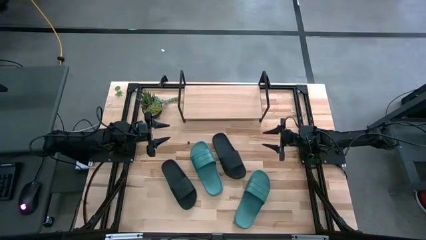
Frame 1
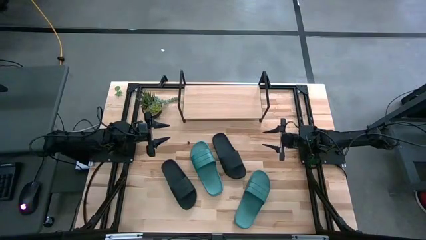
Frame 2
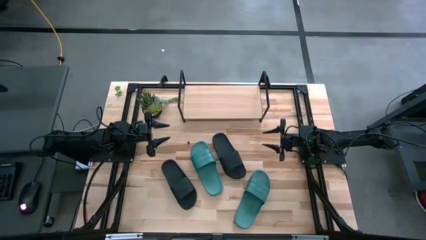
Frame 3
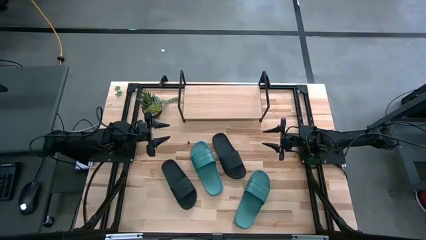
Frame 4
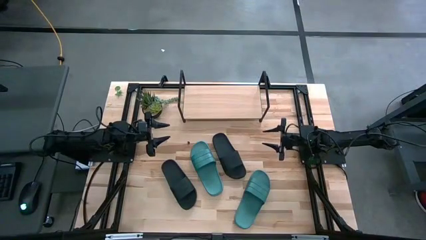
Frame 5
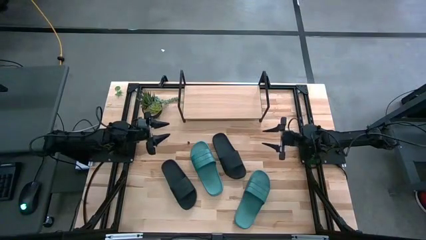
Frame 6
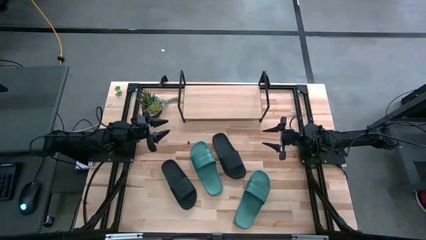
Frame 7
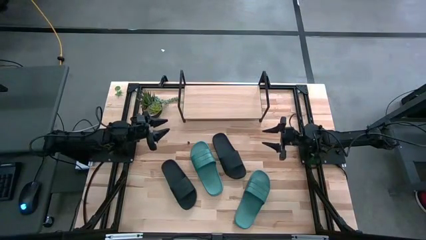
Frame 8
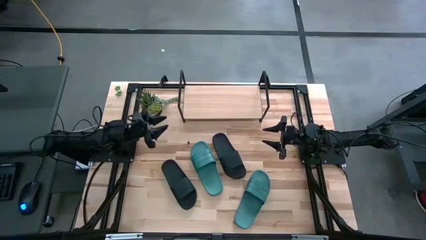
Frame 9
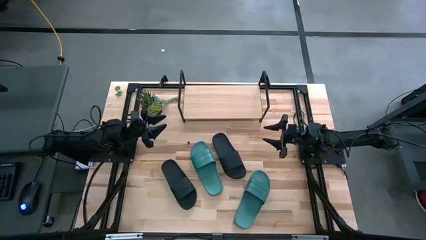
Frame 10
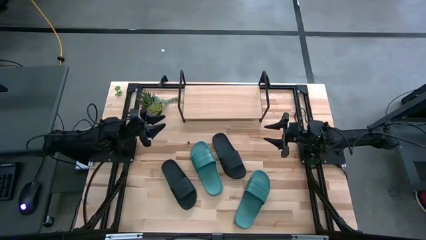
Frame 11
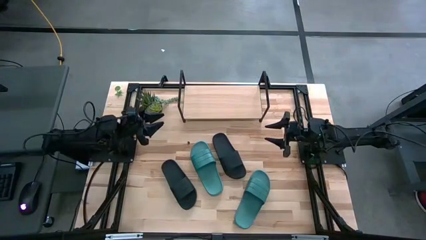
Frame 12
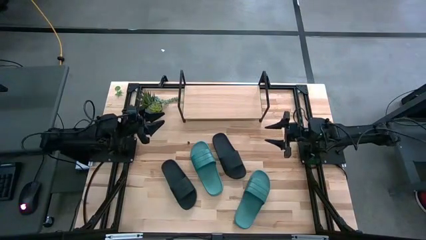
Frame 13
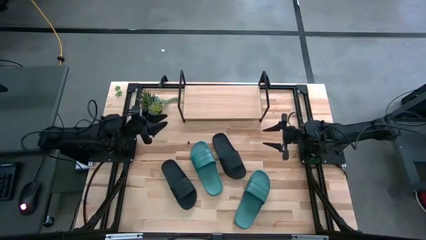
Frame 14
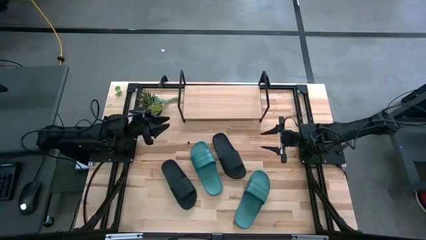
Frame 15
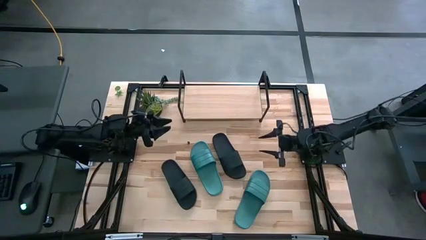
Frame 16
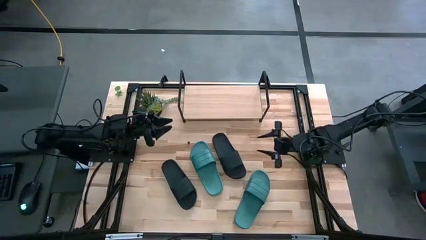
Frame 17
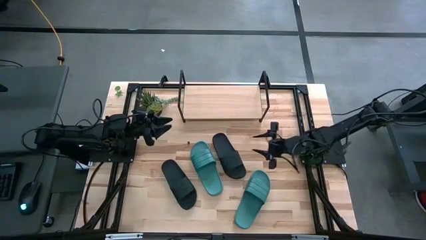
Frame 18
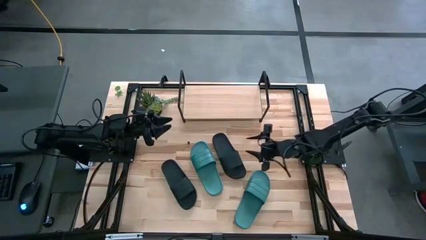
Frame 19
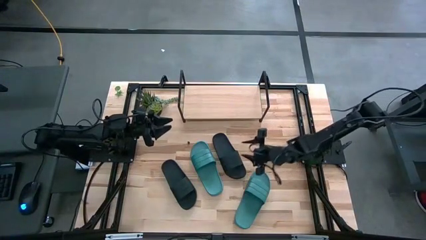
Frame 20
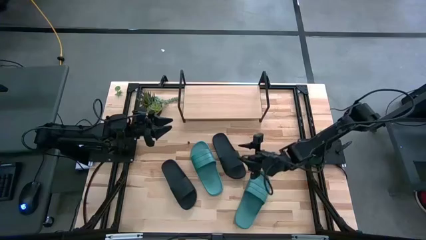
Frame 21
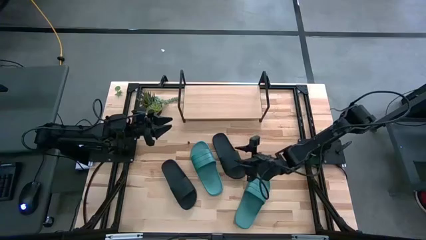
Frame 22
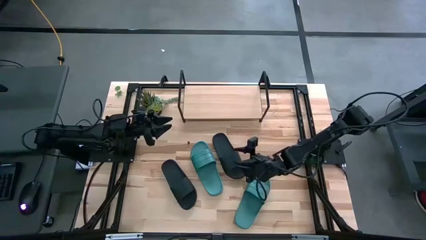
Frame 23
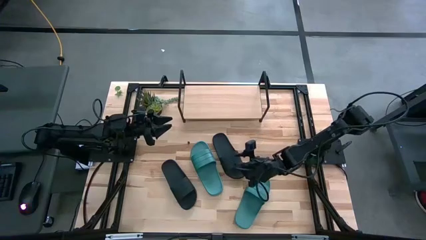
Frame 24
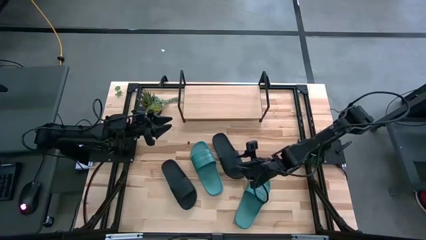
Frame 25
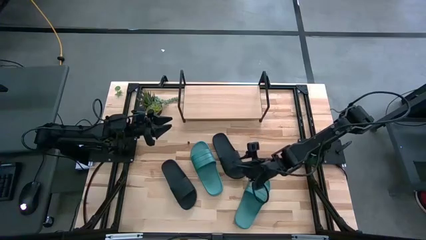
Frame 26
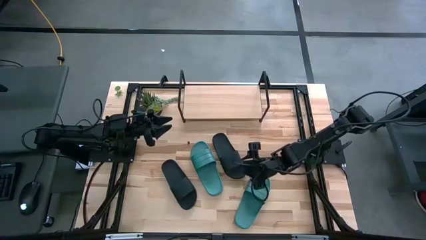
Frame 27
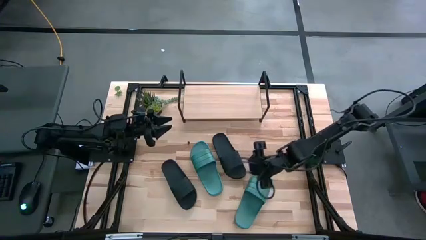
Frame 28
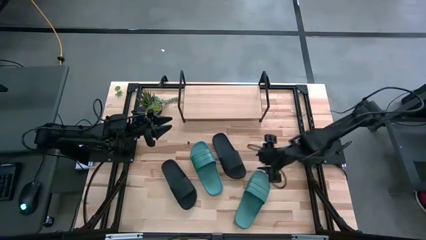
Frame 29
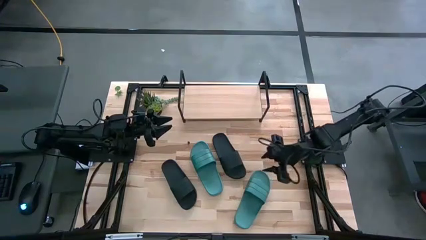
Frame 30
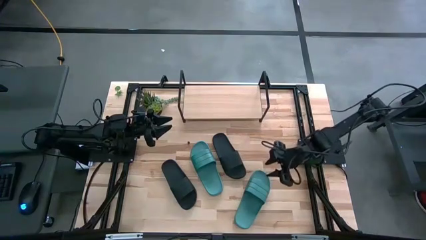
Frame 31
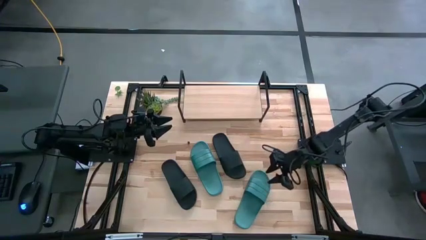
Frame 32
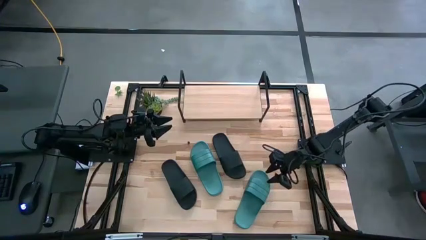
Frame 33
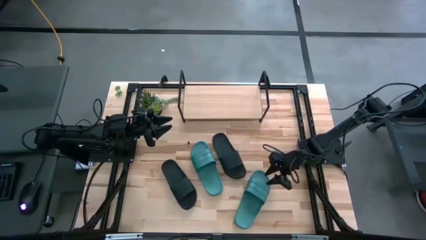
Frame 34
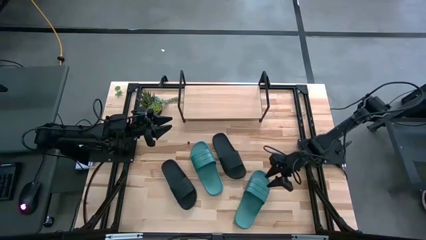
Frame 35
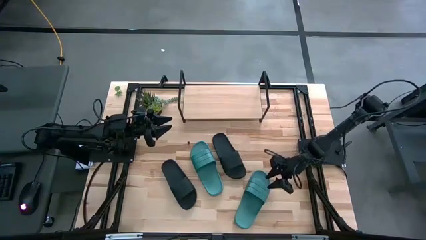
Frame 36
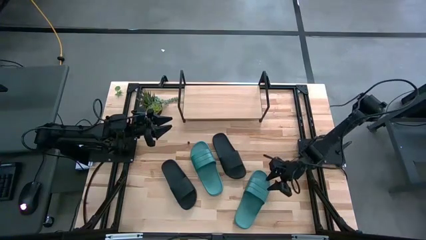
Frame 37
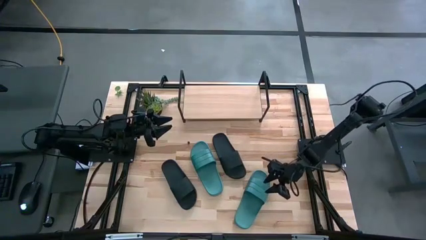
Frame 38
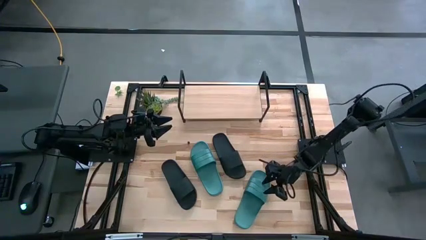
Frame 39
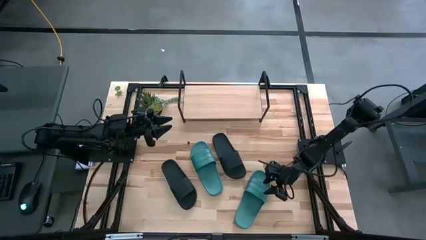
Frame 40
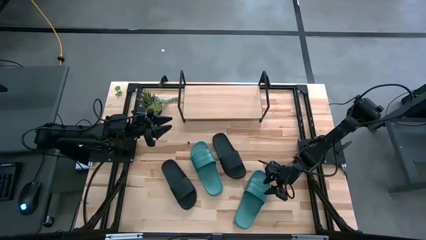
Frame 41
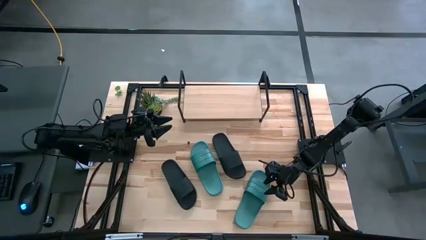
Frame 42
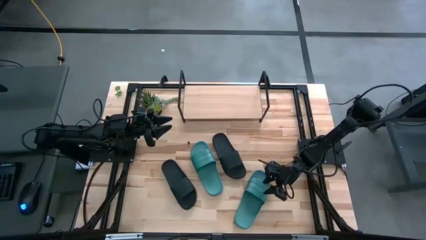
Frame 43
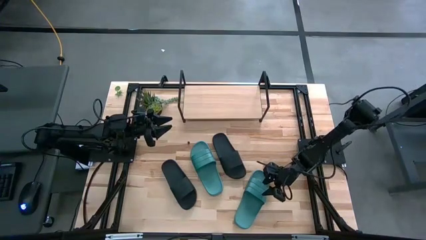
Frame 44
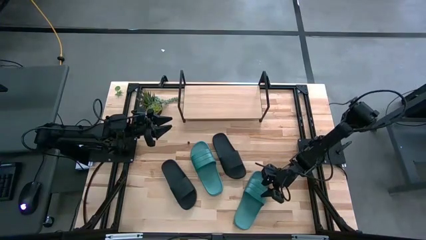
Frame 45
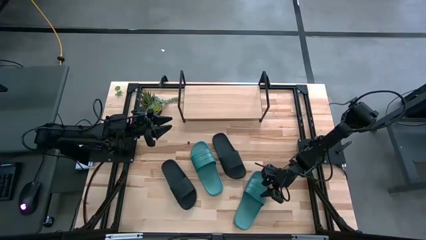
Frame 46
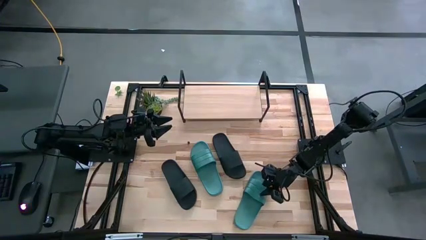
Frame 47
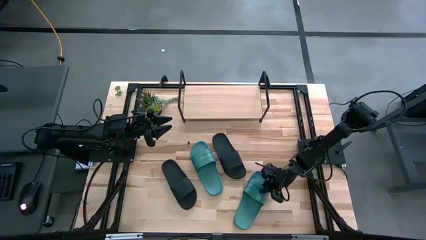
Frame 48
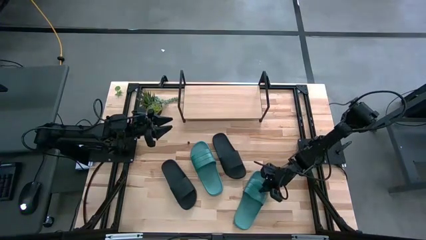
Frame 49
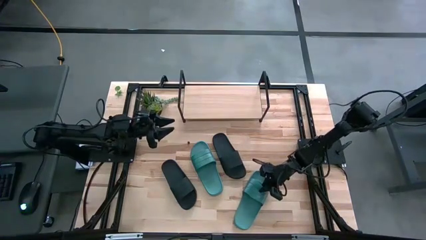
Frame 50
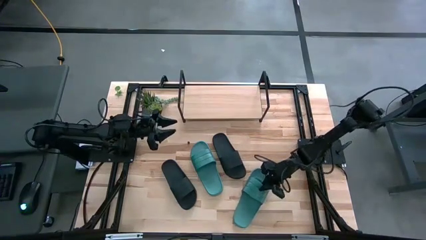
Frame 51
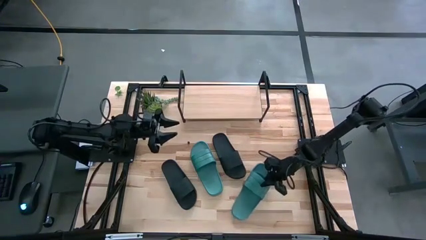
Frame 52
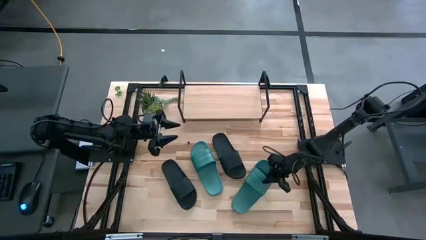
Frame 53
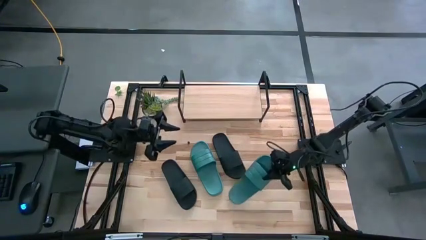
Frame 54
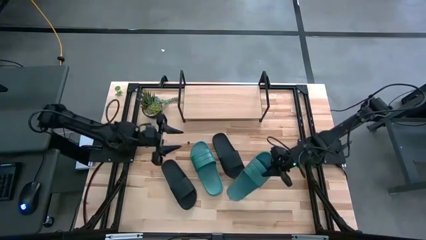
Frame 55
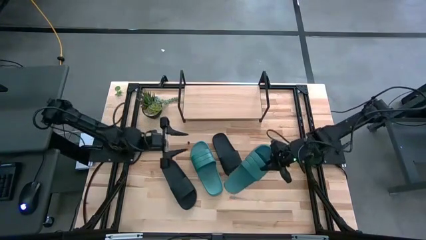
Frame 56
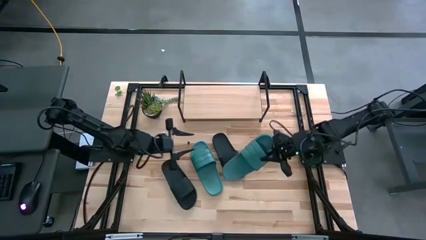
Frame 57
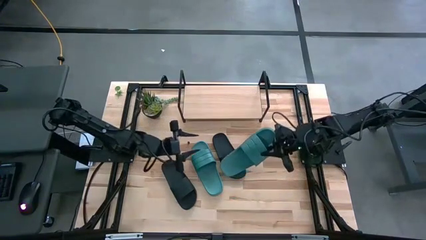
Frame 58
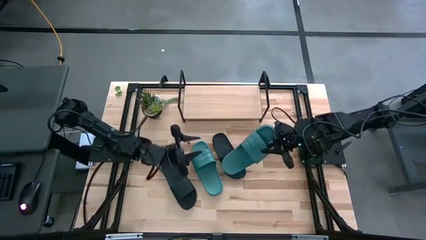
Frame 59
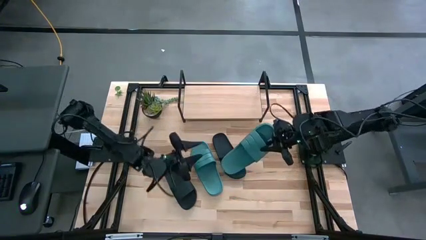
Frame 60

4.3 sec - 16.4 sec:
Task: Pick and place slides into the shelf
Put the right green slide on the shelf

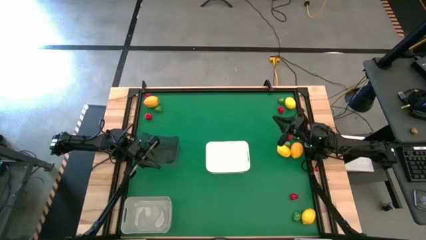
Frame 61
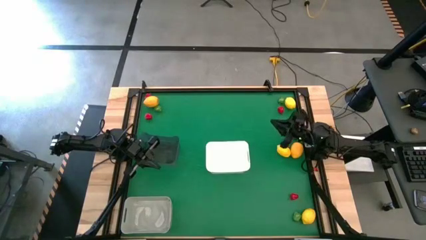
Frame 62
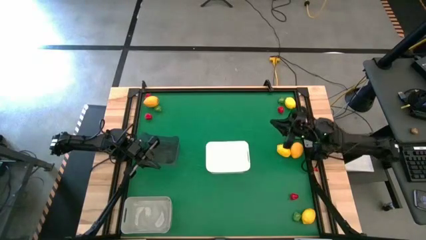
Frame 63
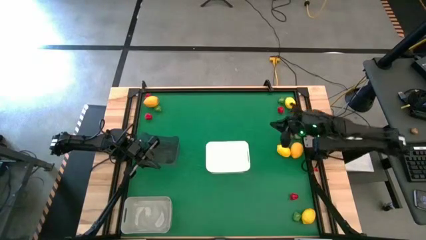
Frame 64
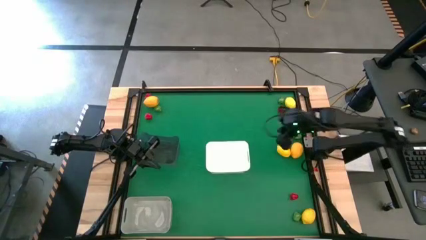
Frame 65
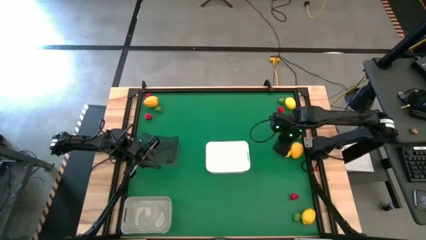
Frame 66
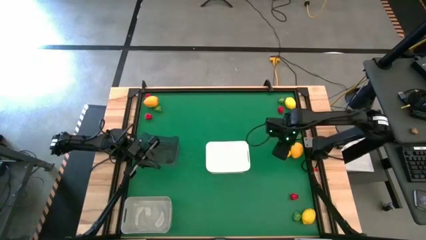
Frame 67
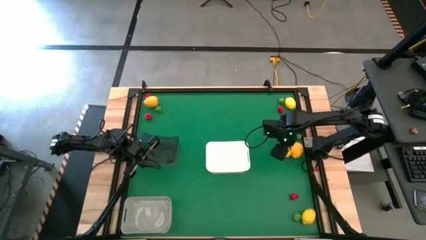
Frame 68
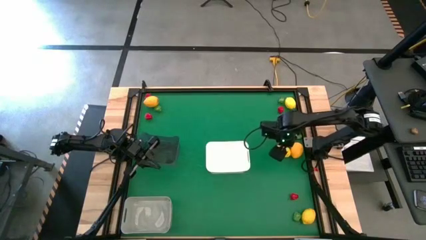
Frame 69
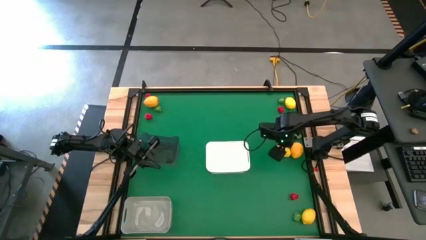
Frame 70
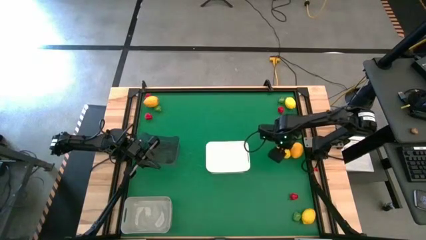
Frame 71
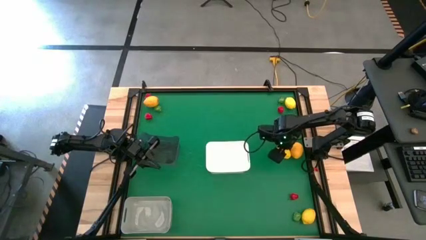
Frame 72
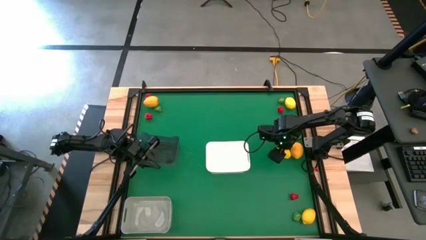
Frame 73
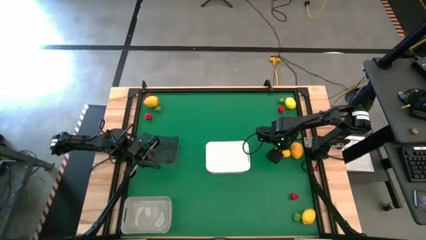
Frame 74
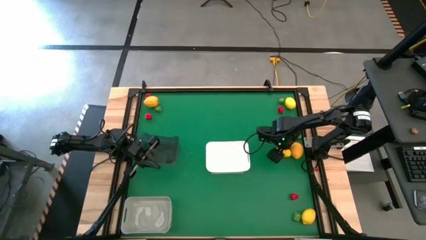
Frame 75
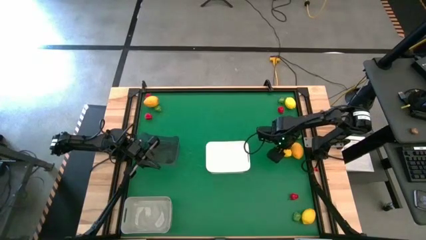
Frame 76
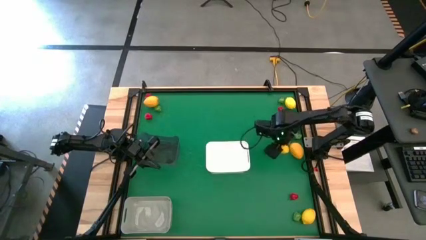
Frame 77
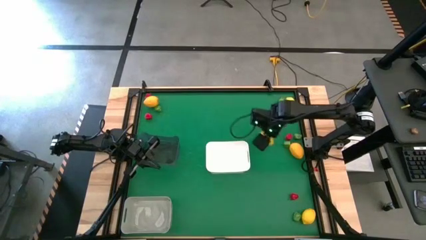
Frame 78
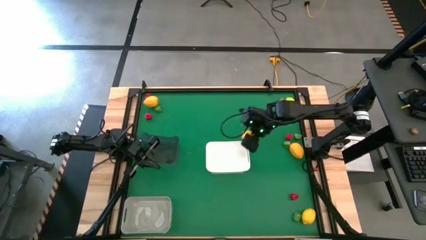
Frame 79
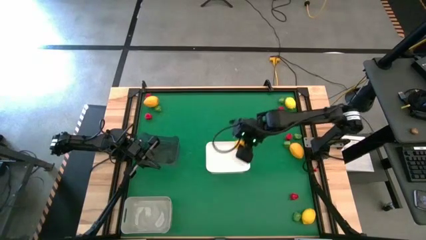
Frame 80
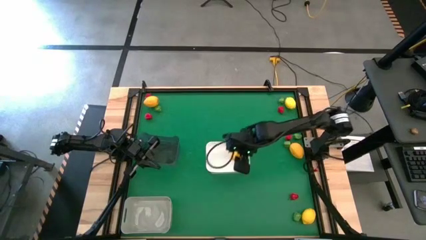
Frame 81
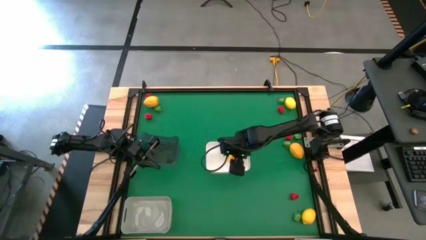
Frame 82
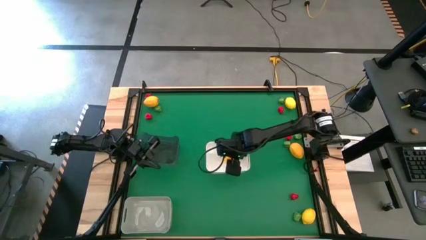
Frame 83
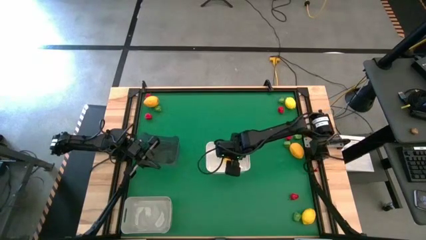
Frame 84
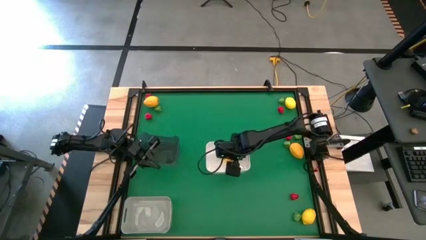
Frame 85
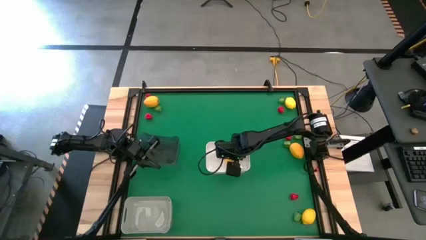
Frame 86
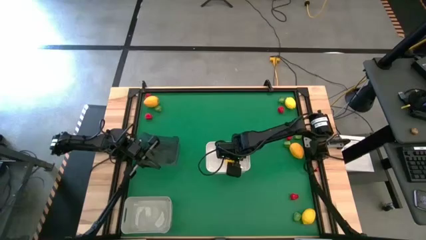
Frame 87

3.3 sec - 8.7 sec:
Task: Sort produce into baskets
Put the yellow lemon into the white bin
